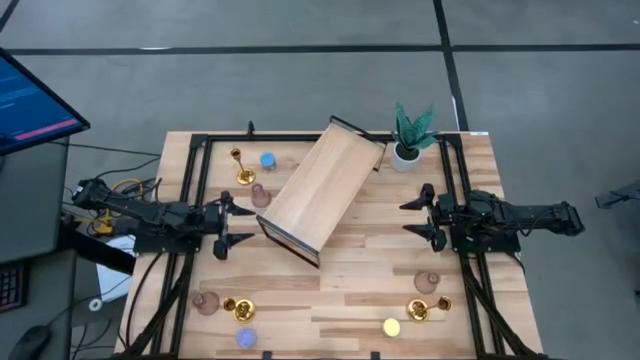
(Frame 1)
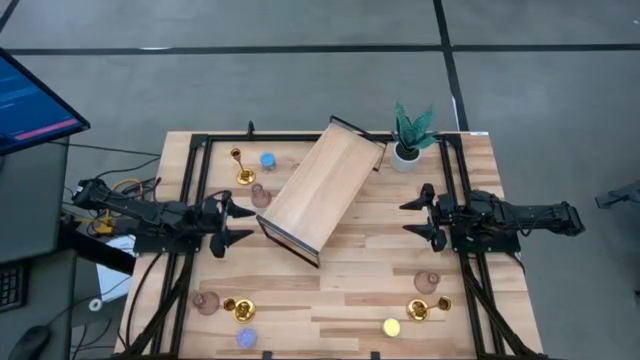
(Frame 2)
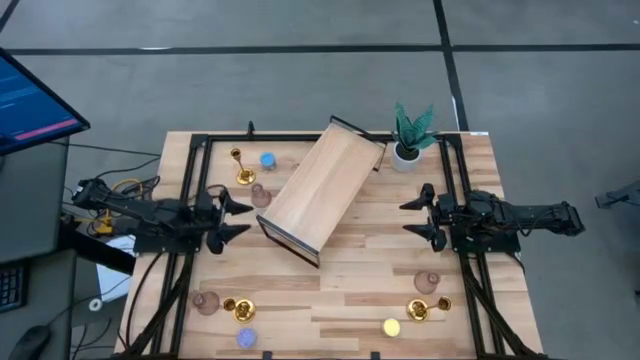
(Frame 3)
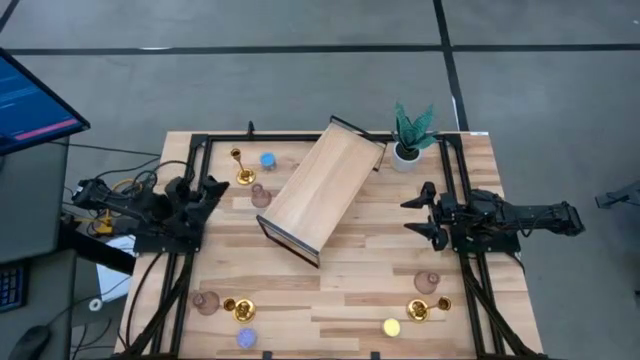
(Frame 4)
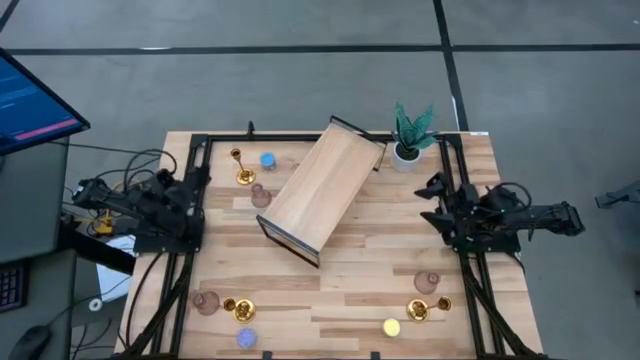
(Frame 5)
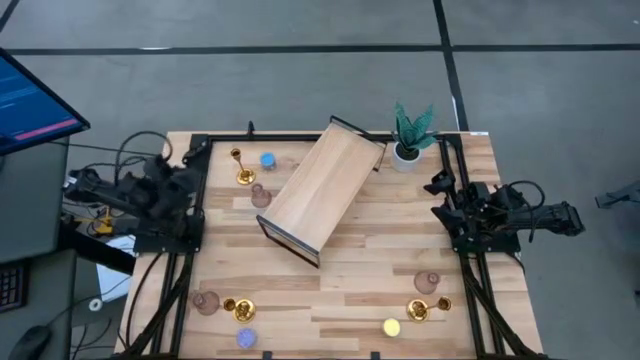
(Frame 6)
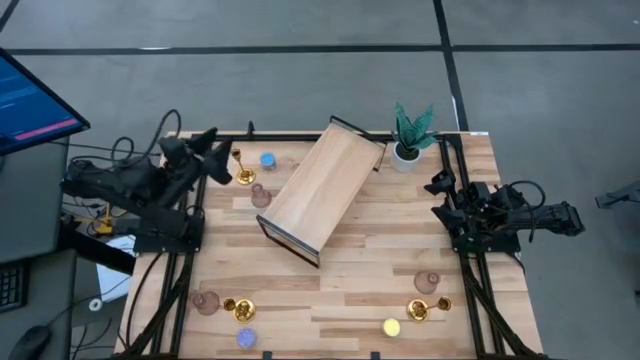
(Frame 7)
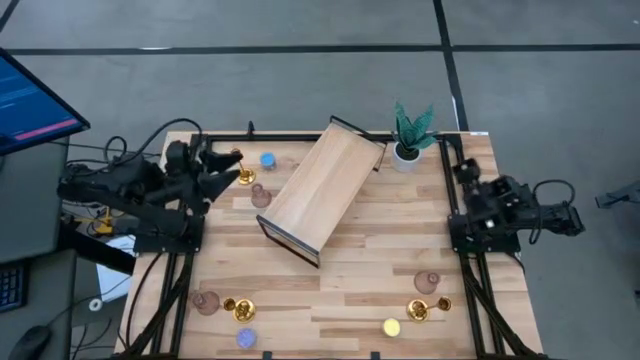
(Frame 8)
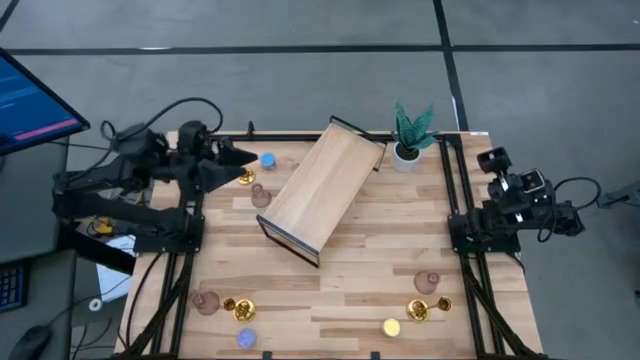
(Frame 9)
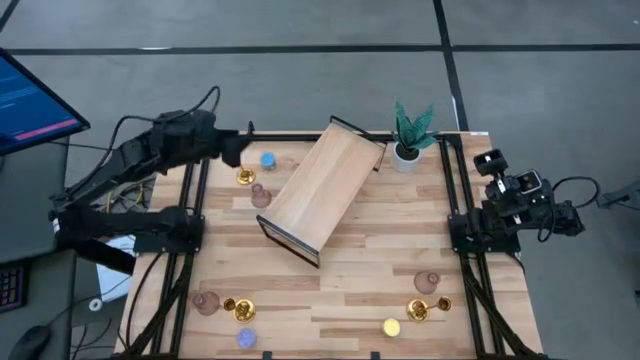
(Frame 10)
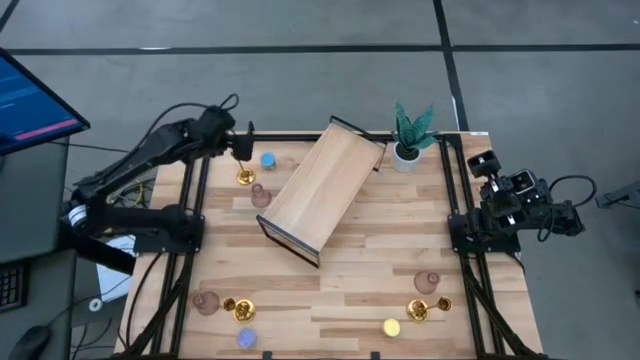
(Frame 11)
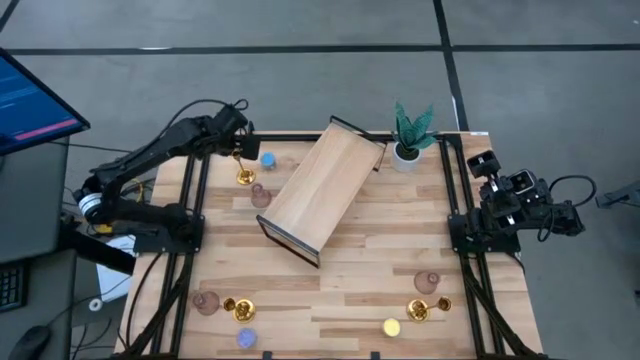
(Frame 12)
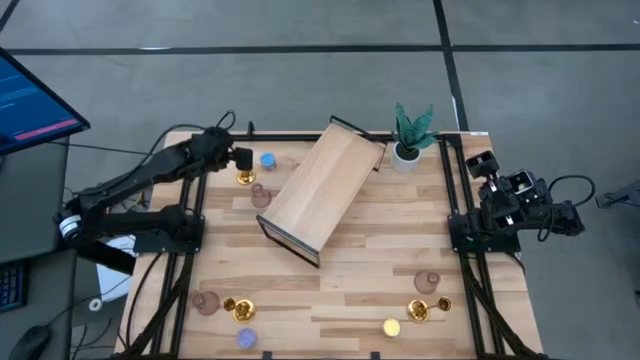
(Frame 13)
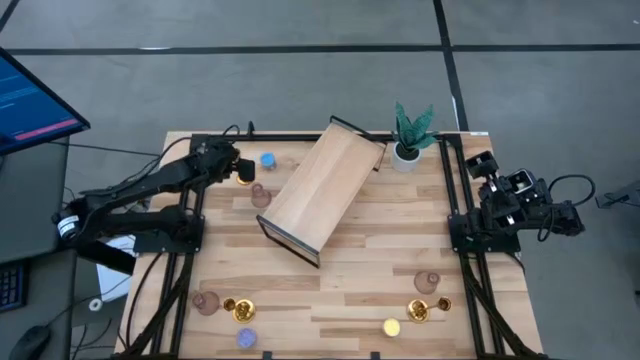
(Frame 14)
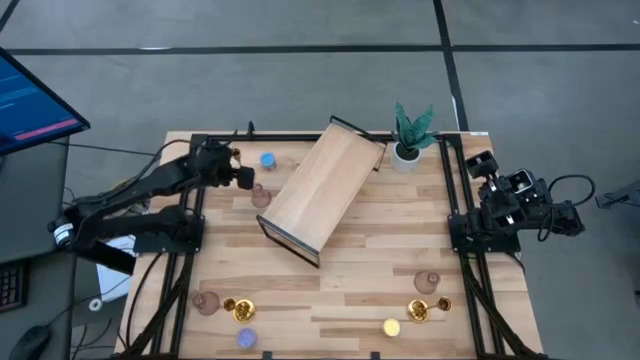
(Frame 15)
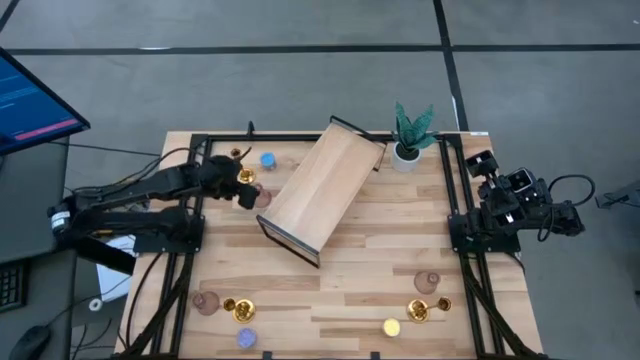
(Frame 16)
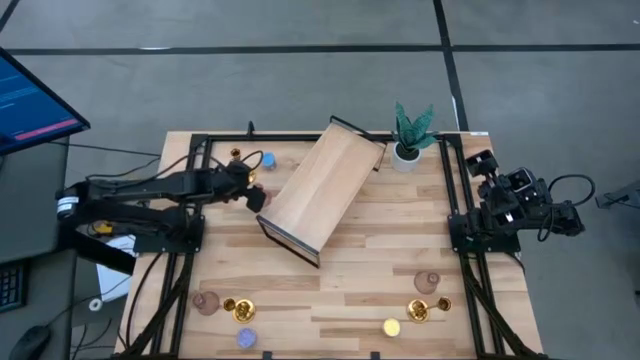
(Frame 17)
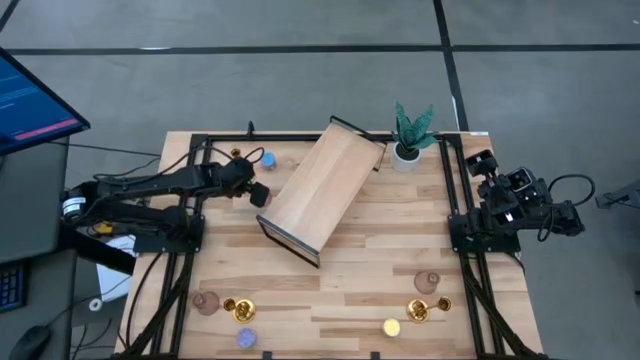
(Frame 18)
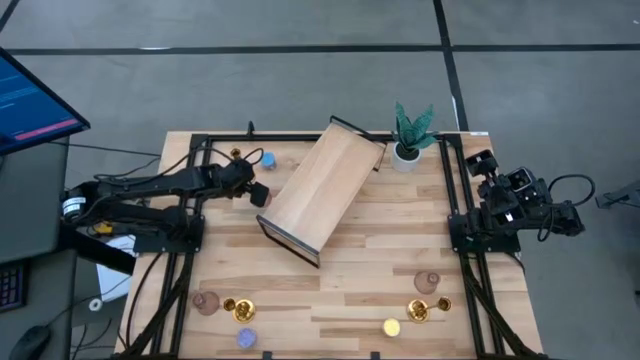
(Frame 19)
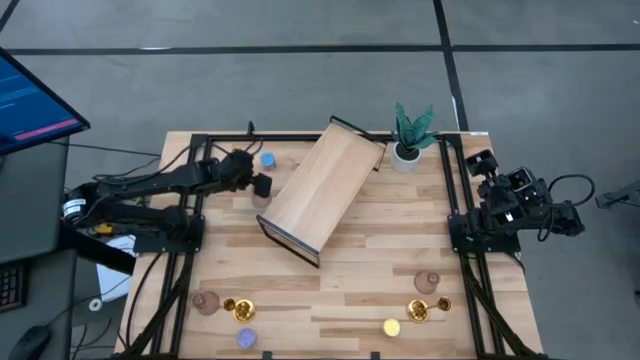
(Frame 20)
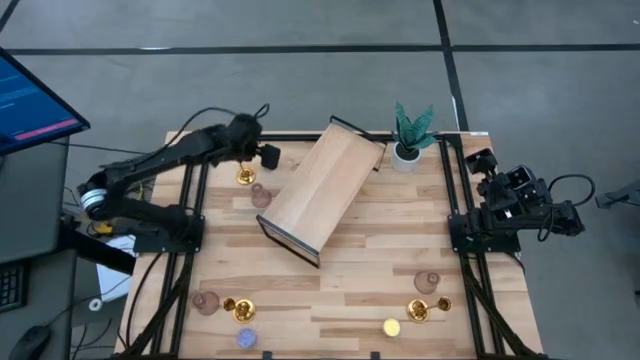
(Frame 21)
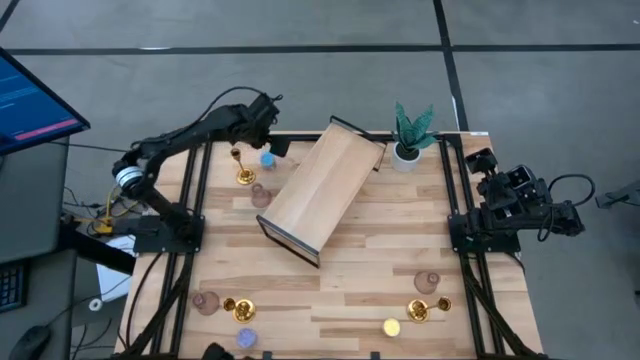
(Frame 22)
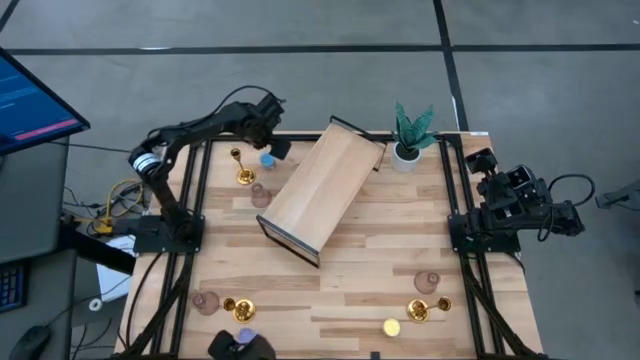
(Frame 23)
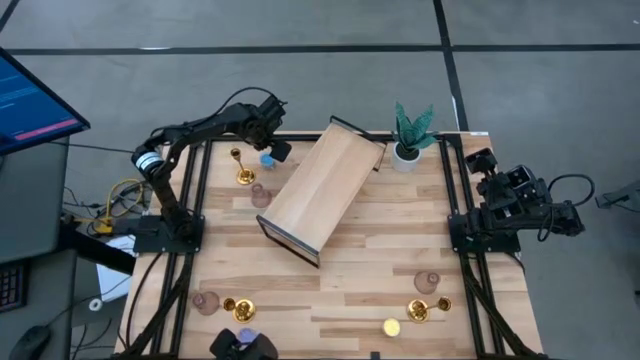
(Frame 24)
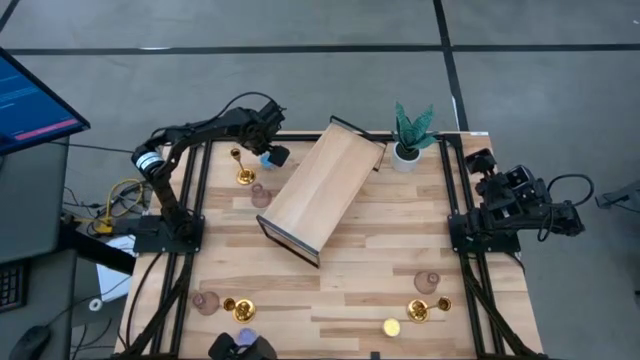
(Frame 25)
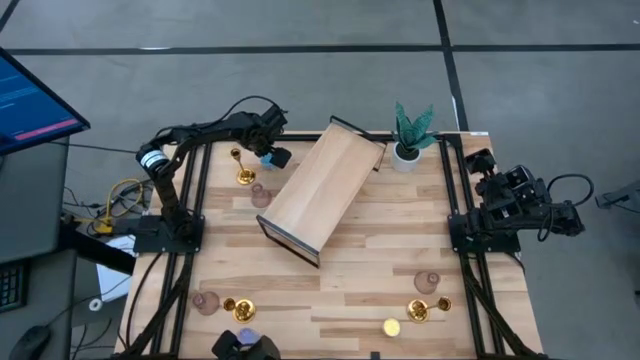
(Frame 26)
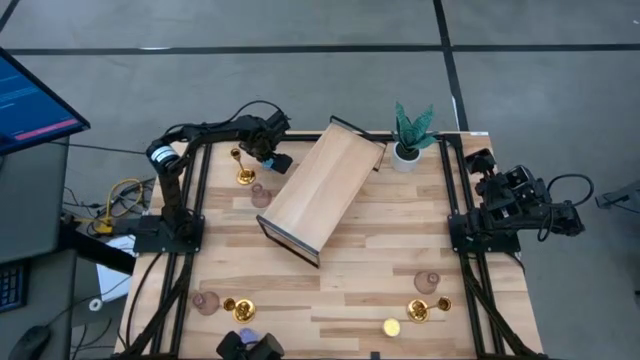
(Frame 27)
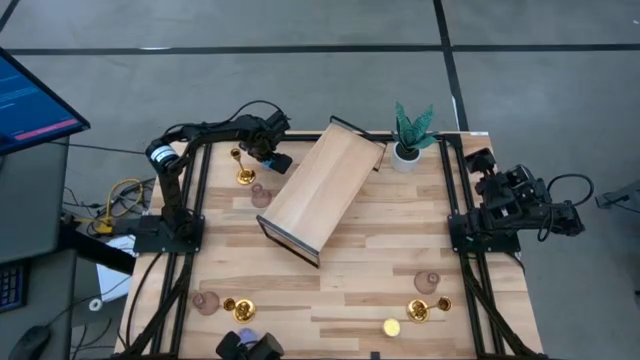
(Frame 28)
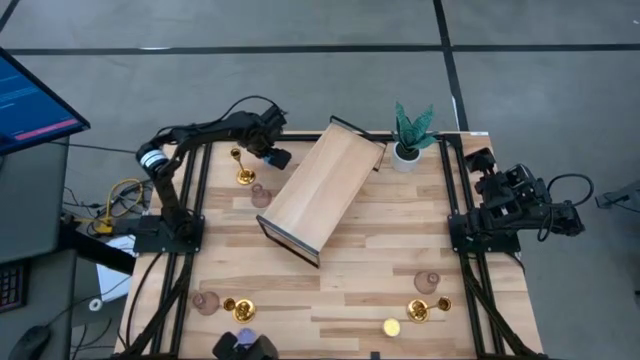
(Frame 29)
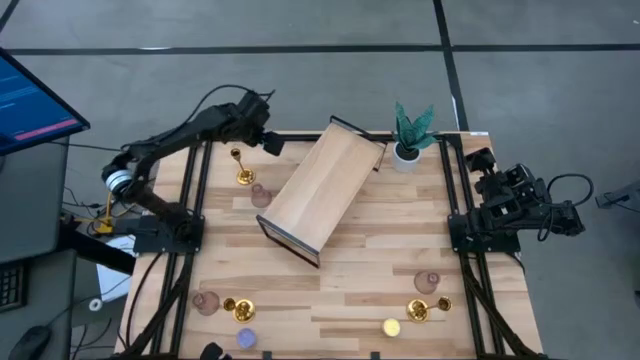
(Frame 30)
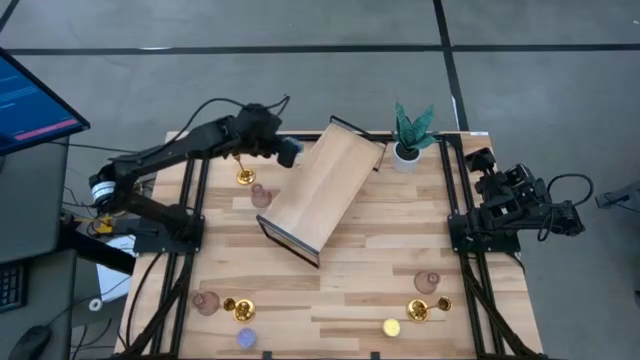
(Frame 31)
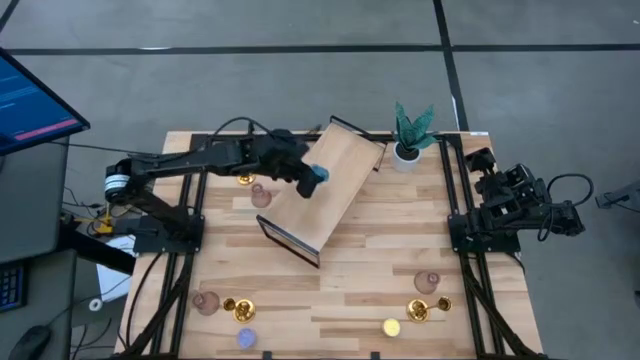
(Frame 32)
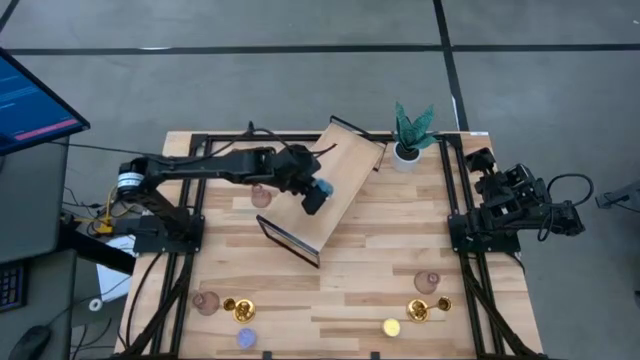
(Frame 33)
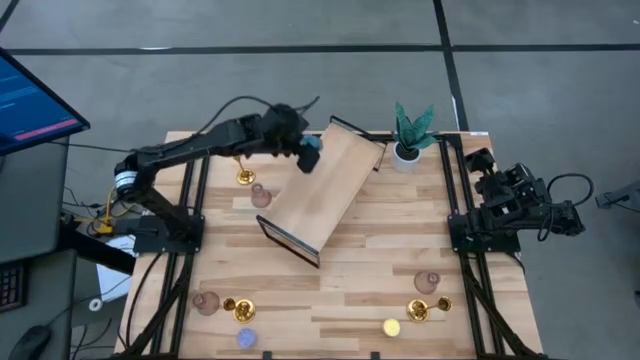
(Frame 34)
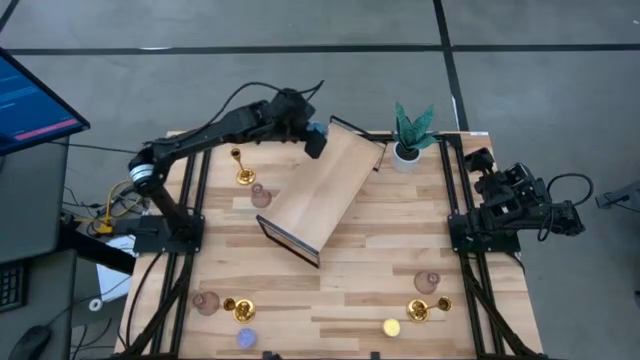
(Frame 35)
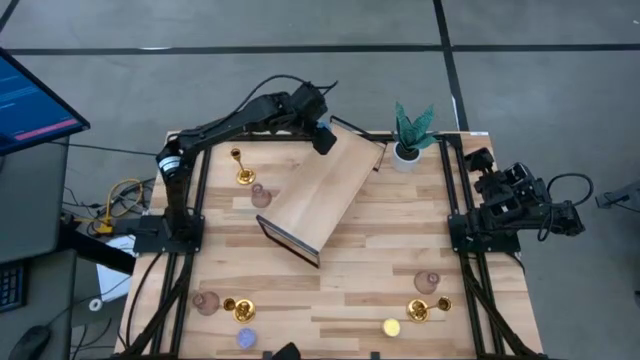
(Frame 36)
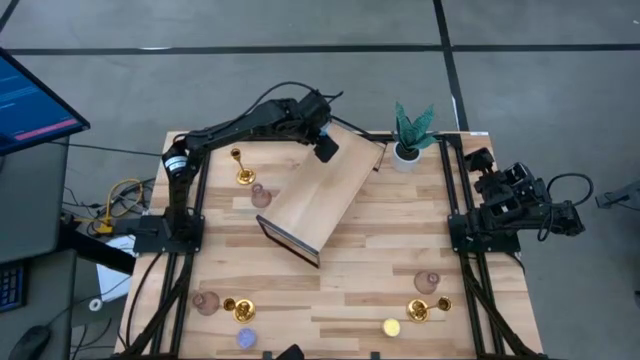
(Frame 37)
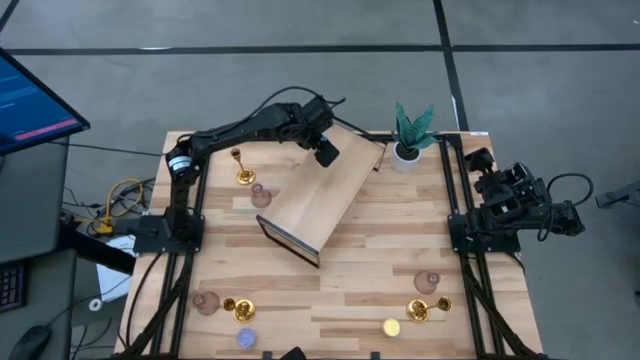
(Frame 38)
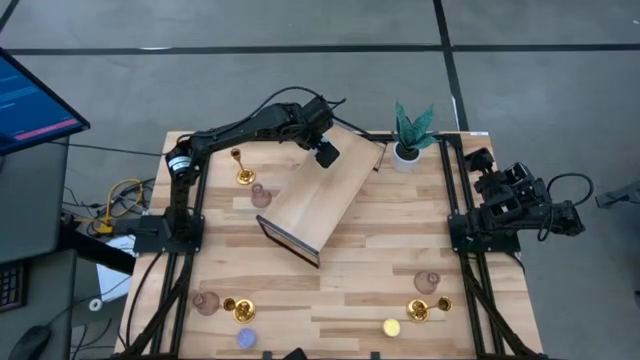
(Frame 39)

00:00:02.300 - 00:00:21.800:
Task: Pick & Place candle stick holders
Put the blue candle on the shelf

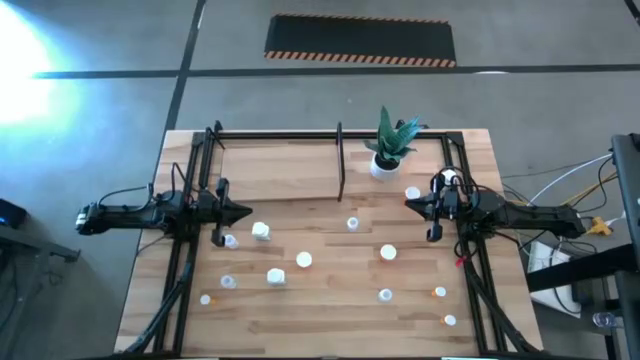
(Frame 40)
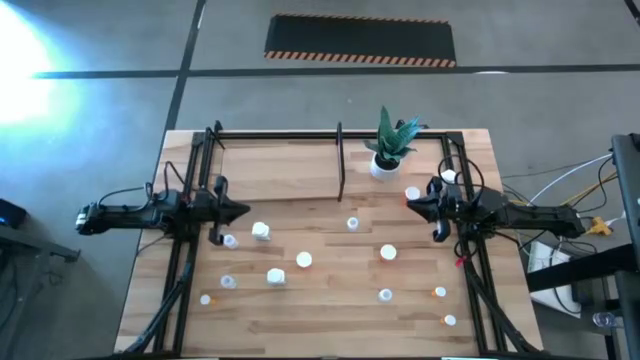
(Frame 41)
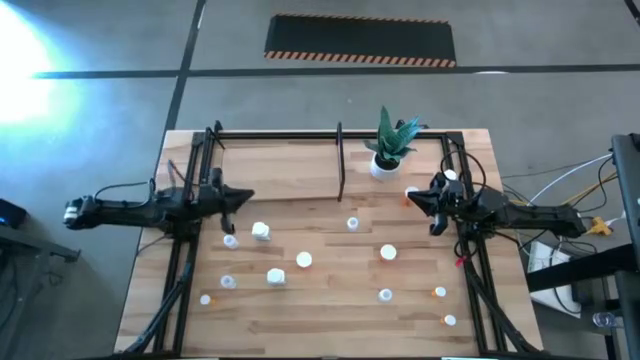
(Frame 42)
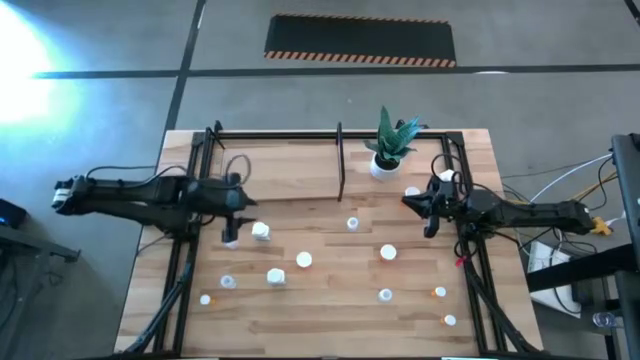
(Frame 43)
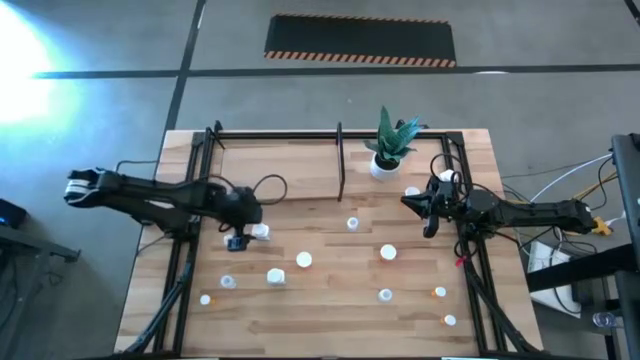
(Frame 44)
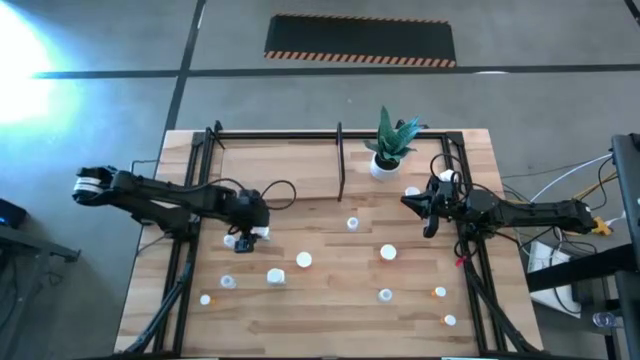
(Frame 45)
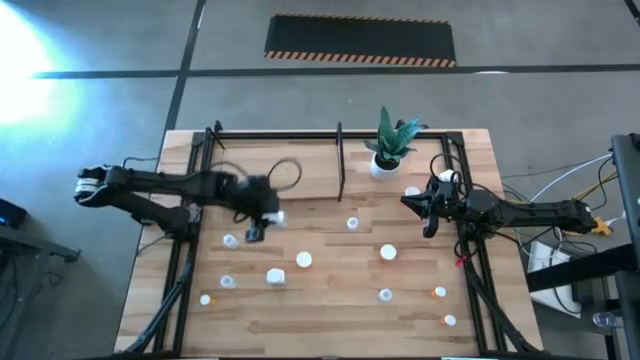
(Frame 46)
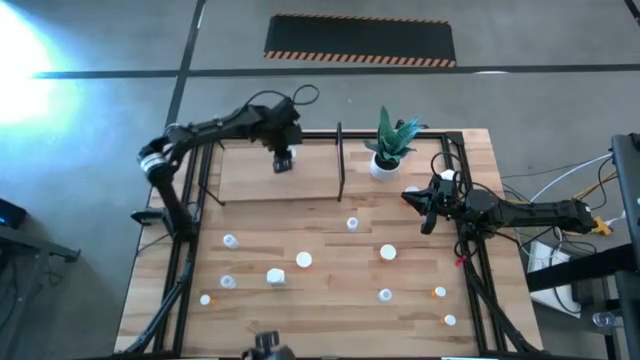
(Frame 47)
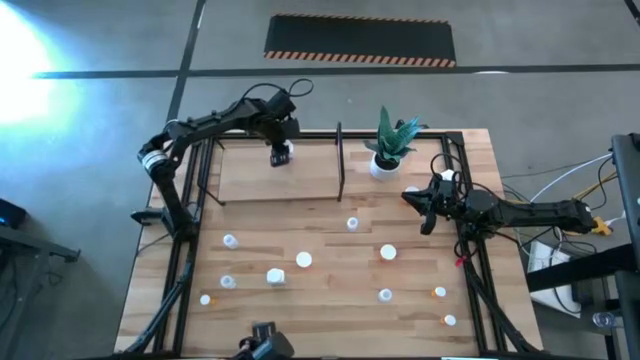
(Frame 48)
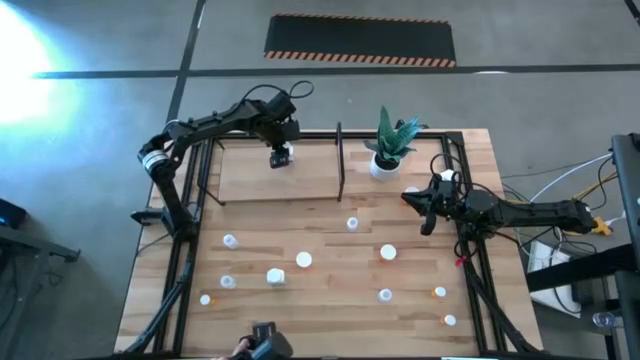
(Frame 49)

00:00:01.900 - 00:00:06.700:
Task: Pick and place medicine bottles onto shelf by color
Put the white blue medicine container on the shelf
